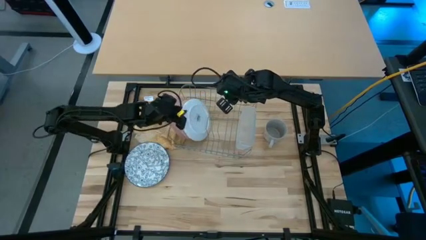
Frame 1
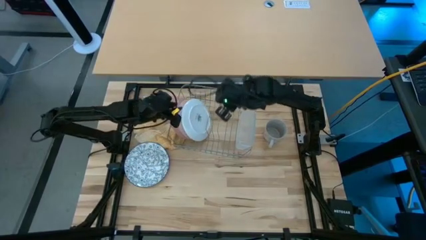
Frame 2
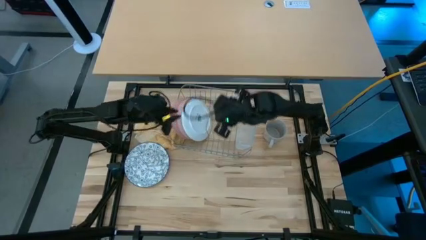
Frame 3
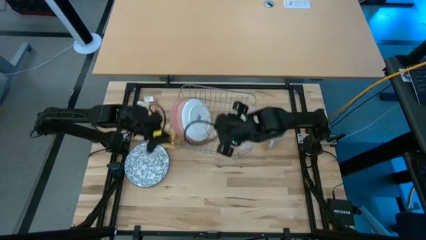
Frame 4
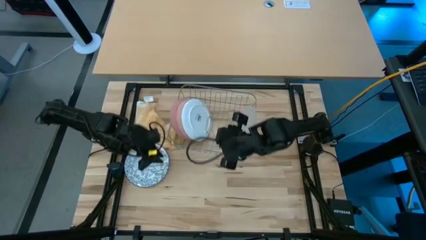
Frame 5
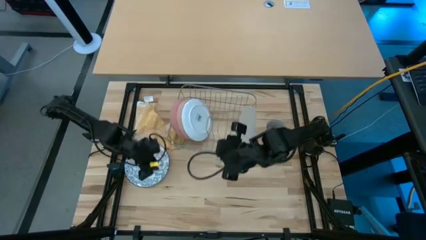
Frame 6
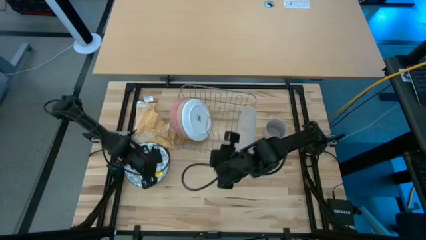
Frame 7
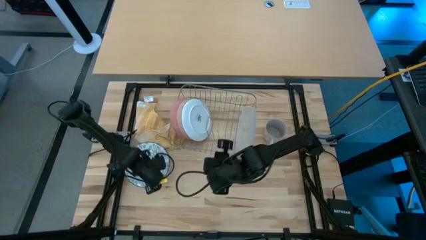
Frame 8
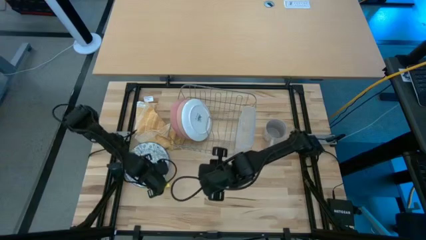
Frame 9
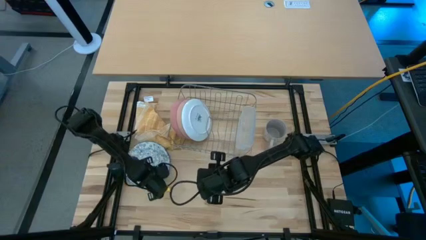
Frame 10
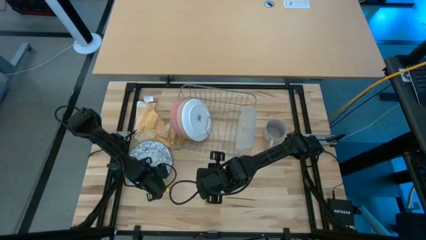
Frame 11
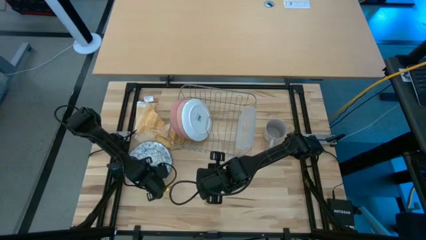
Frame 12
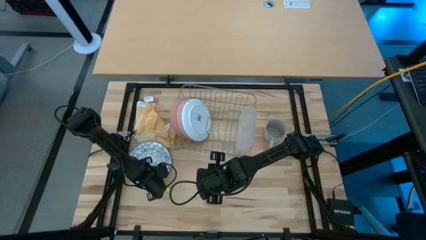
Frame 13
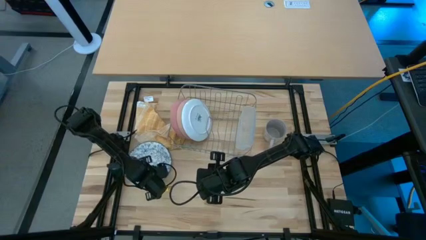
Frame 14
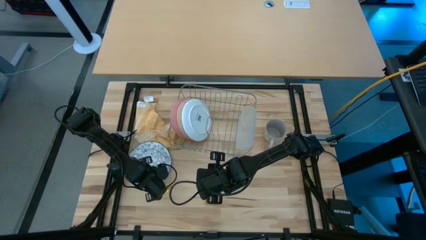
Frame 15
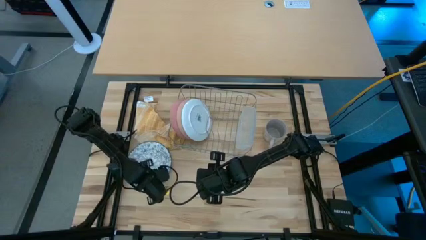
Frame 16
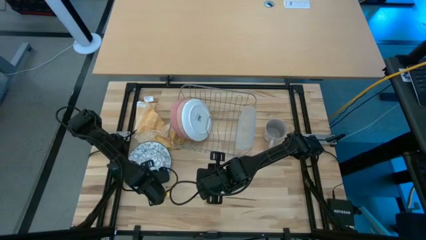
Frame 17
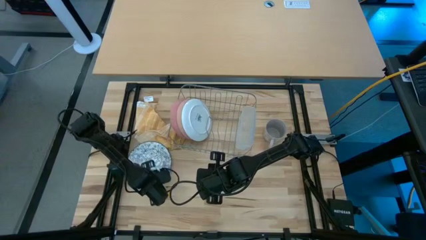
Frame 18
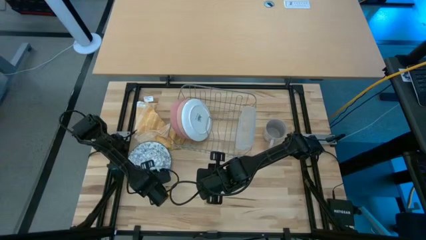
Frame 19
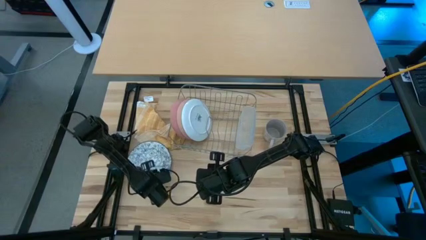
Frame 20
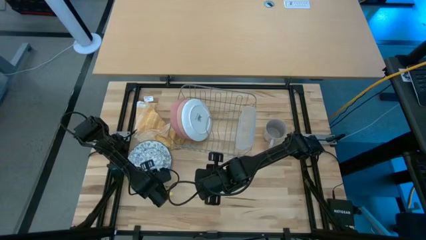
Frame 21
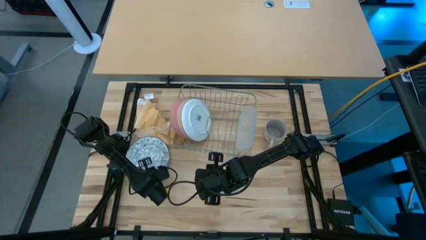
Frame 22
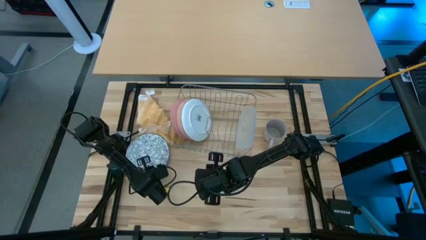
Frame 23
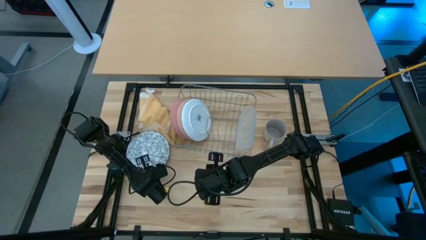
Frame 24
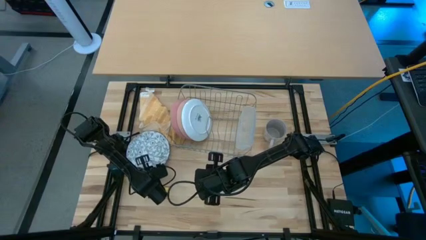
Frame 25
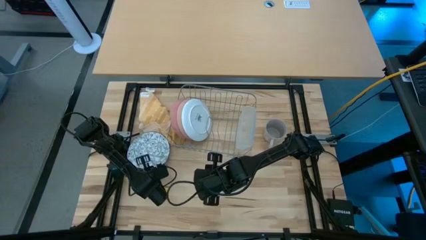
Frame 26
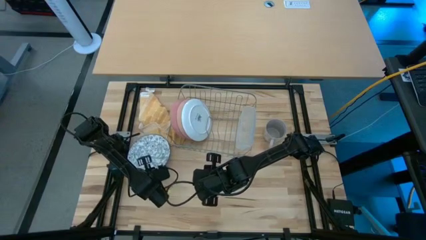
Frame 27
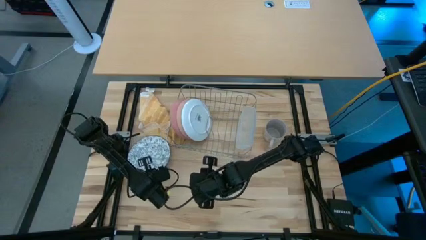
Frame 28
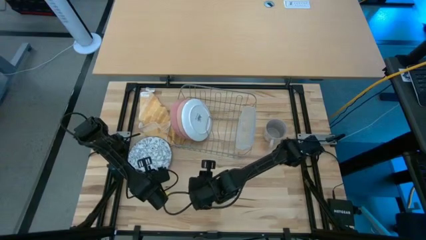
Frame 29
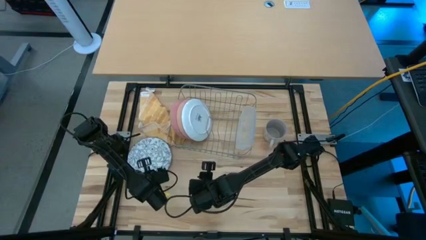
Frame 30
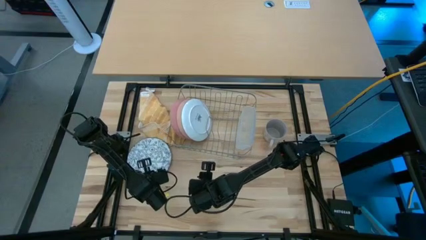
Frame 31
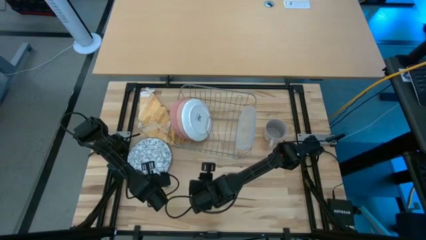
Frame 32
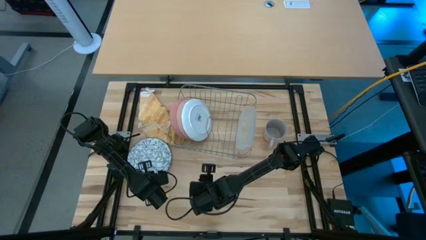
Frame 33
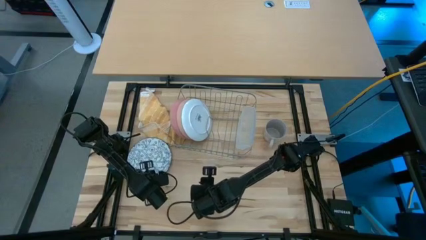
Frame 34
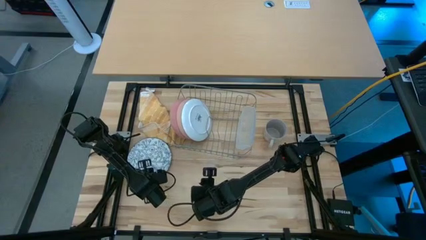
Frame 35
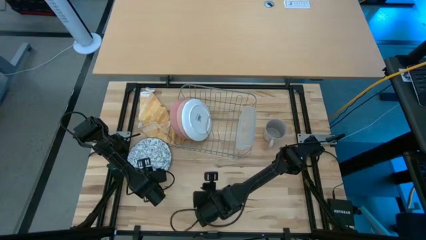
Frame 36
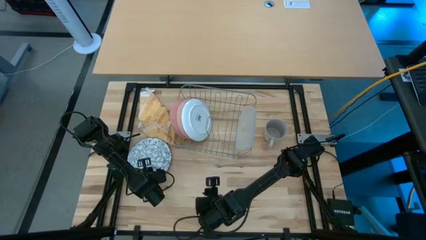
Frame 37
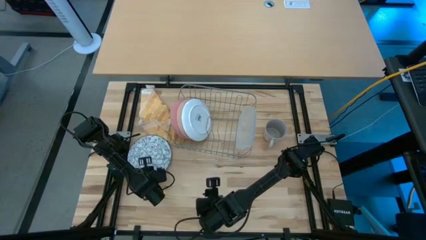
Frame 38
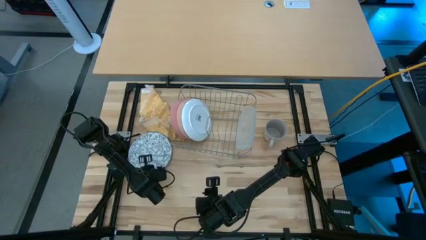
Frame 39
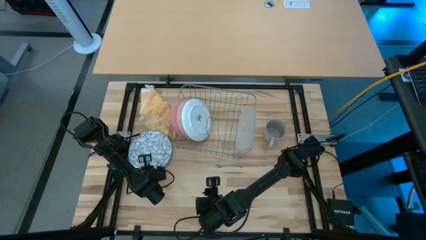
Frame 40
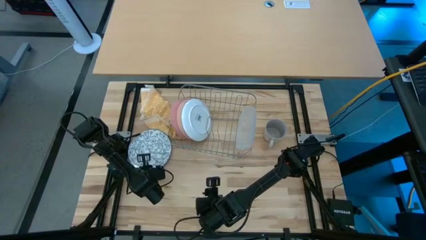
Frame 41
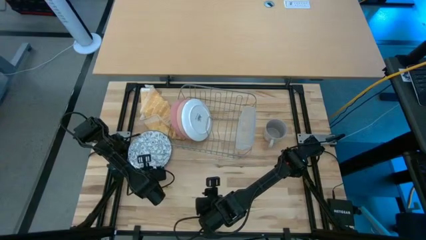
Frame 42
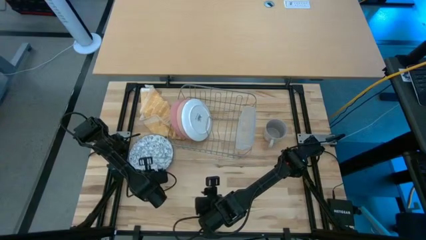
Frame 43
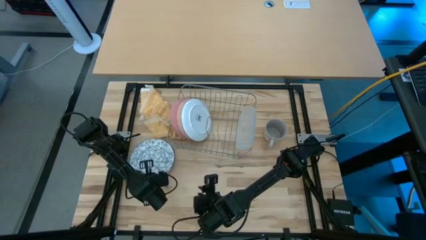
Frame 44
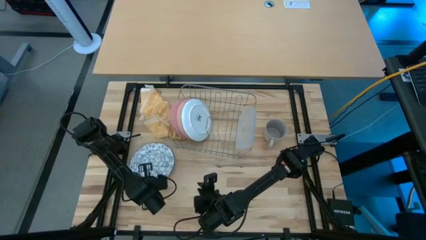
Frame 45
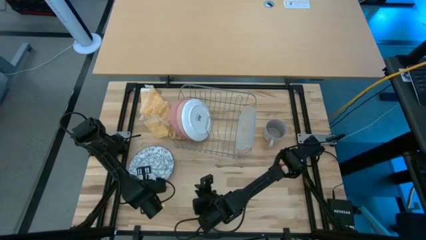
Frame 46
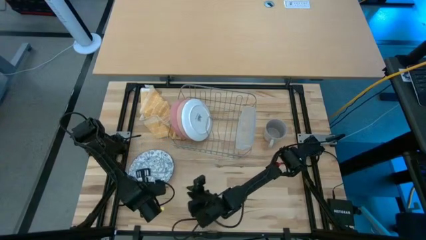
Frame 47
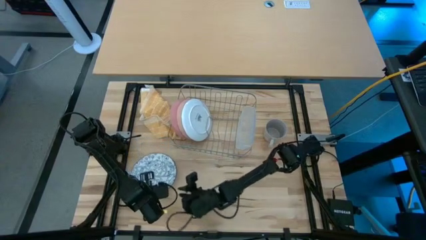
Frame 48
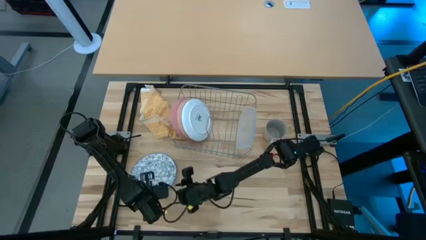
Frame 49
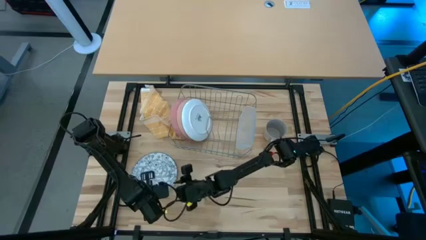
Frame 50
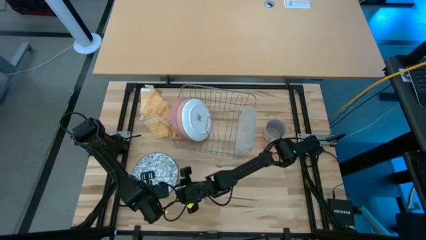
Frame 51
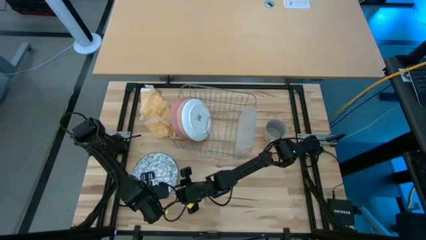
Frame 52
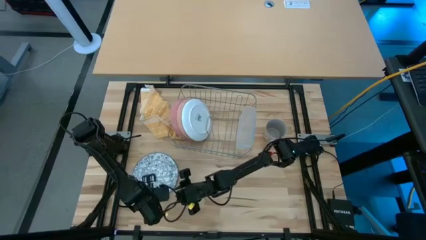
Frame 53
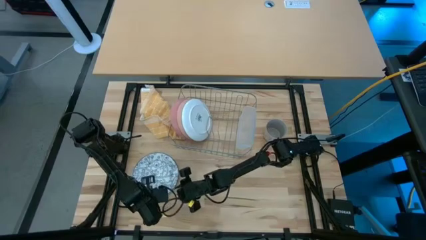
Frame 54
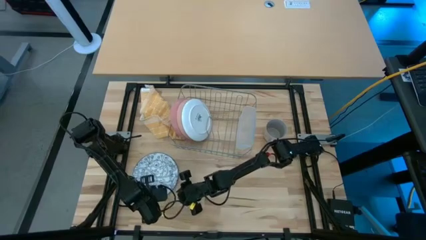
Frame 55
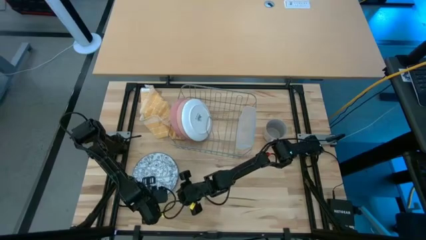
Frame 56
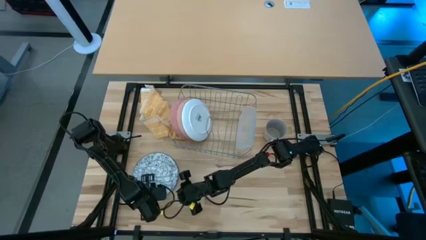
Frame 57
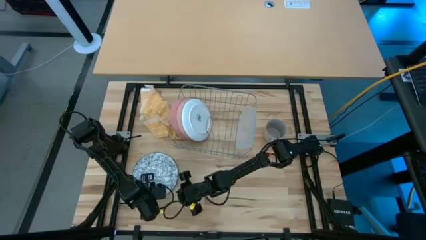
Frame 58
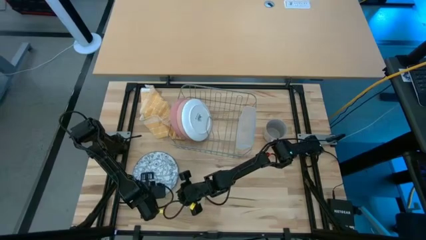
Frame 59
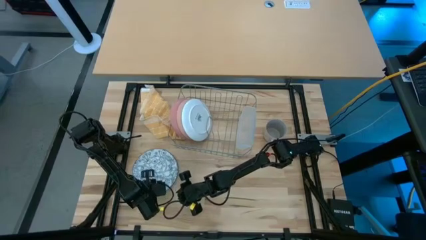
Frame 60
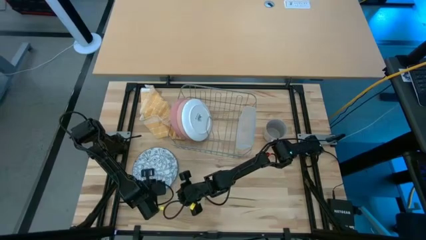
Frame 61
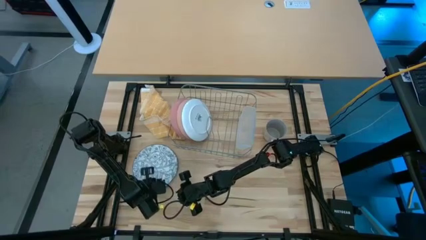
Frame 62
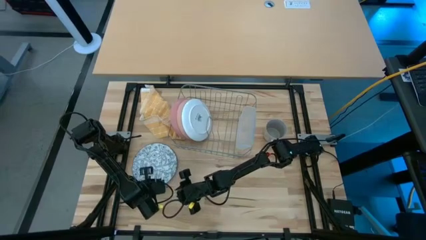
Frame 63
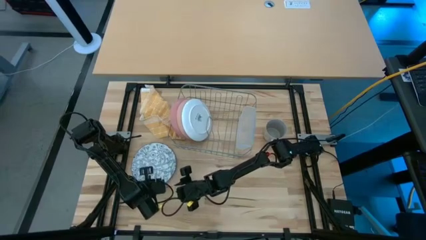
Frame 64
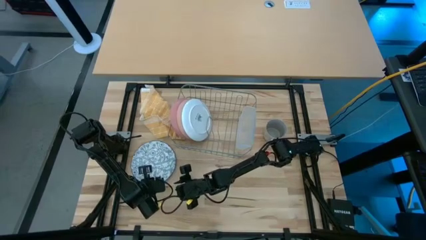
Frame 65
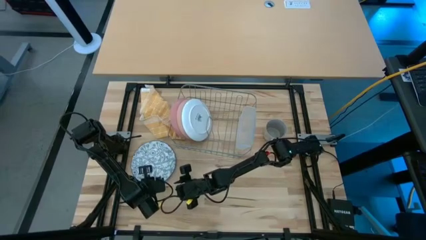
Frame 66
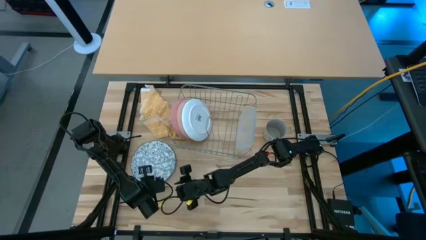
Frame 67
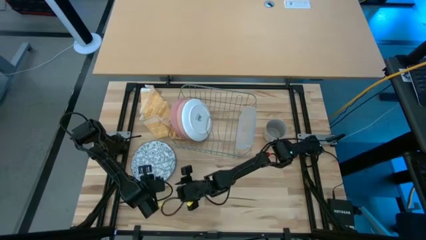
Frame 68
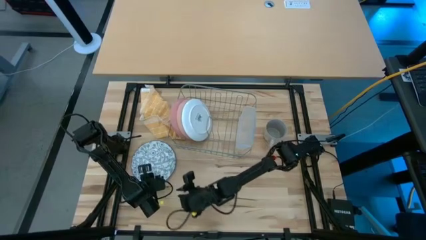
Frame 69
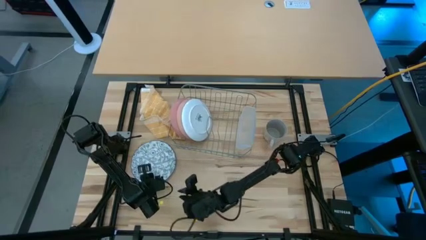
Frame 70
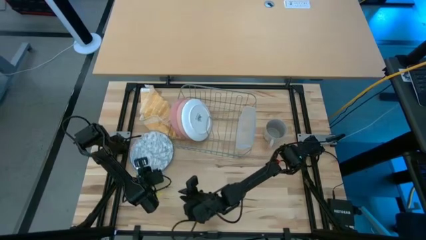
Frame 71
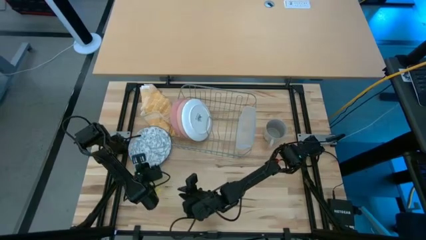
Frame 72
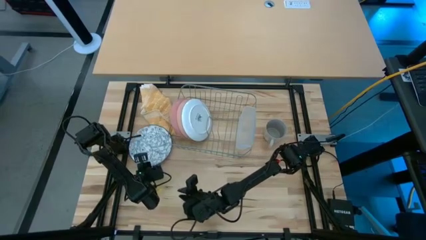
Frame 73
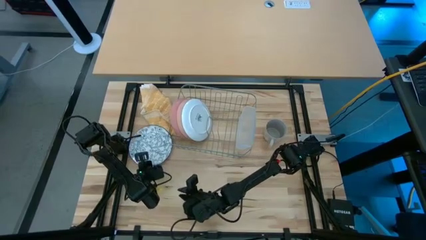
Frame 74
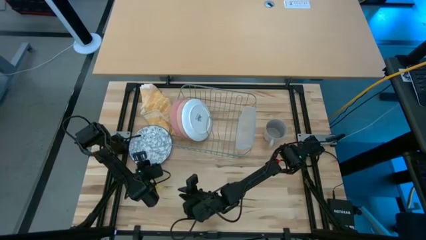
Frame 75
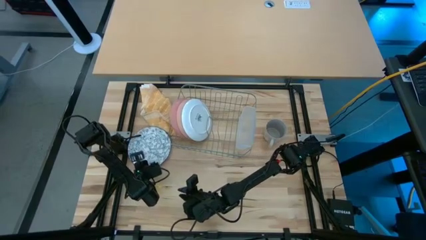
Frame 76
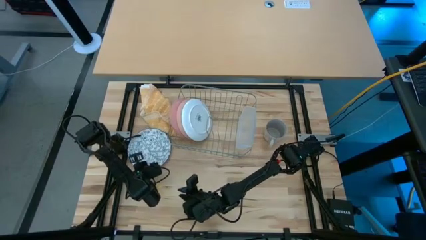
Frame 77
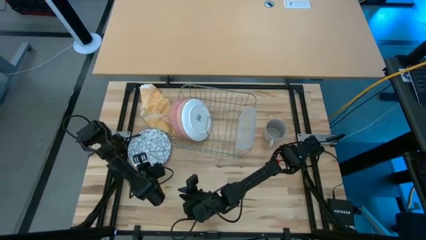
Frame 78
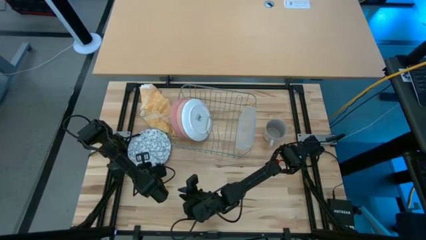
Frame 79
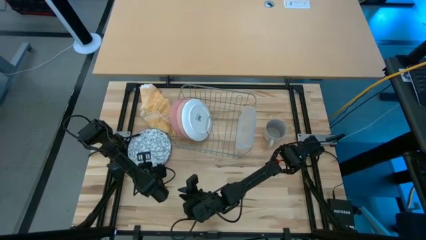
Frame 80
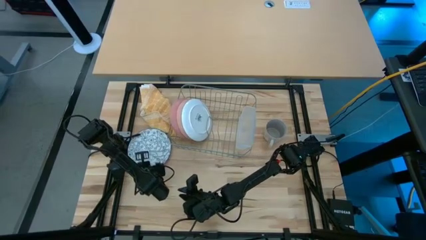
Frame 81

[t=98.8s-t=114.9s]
Task: Sort dishes
Put the white patterned plate in the dish rack
